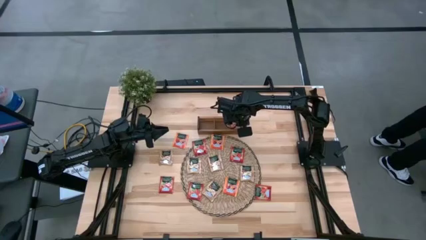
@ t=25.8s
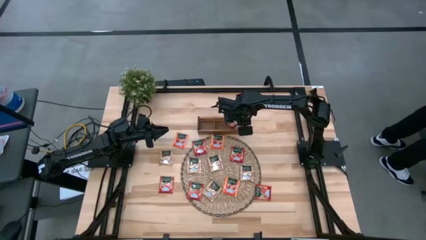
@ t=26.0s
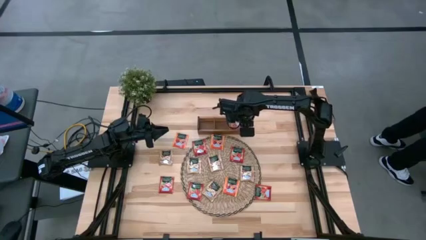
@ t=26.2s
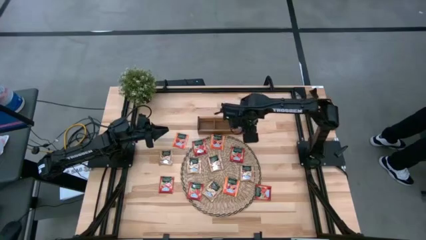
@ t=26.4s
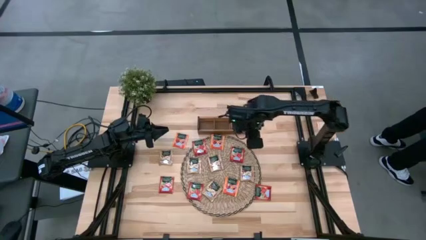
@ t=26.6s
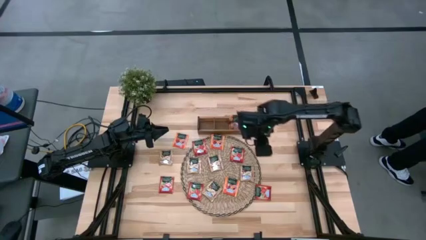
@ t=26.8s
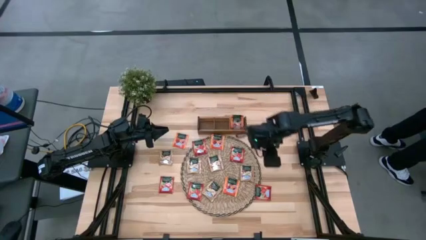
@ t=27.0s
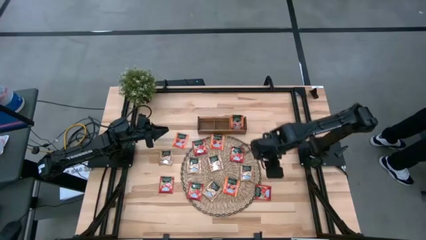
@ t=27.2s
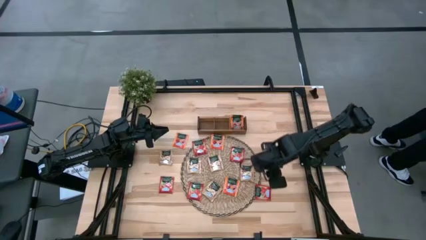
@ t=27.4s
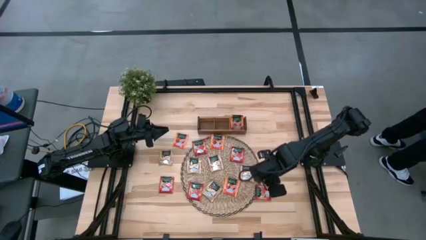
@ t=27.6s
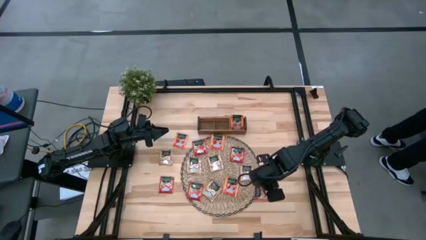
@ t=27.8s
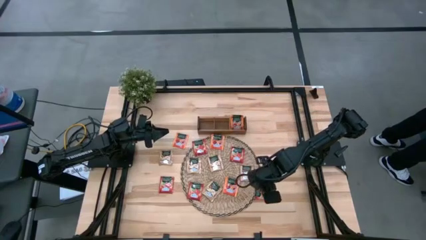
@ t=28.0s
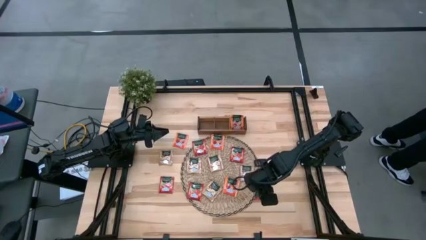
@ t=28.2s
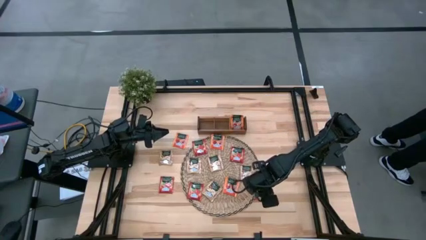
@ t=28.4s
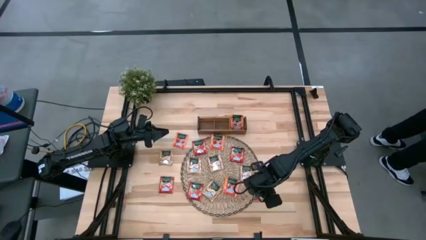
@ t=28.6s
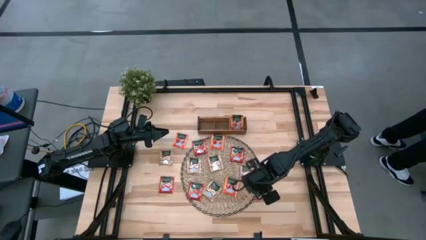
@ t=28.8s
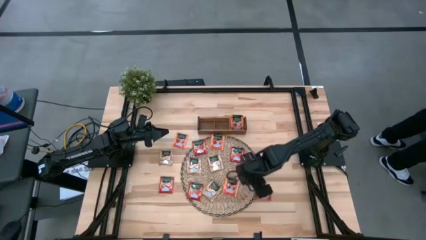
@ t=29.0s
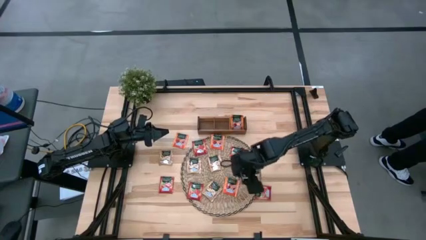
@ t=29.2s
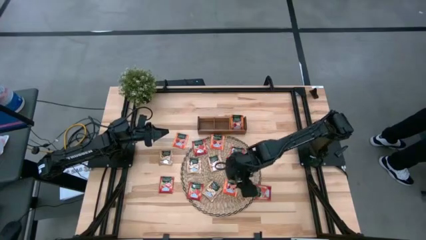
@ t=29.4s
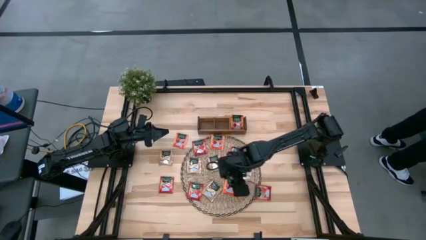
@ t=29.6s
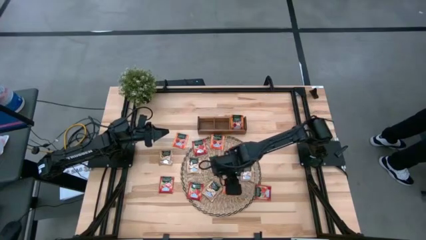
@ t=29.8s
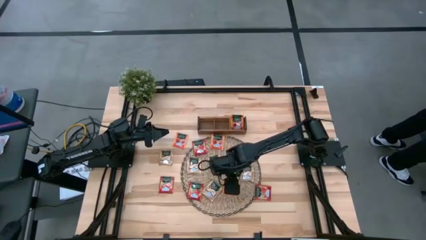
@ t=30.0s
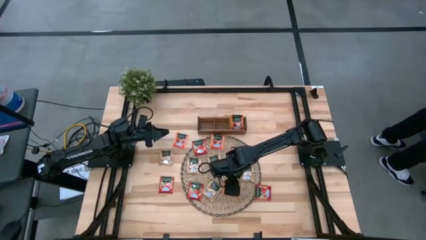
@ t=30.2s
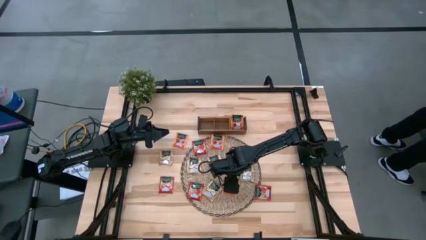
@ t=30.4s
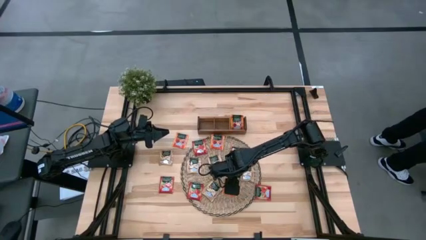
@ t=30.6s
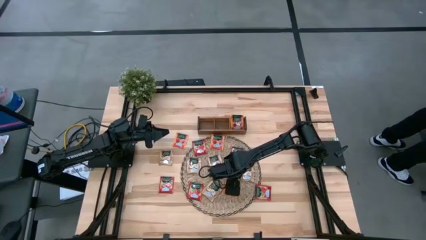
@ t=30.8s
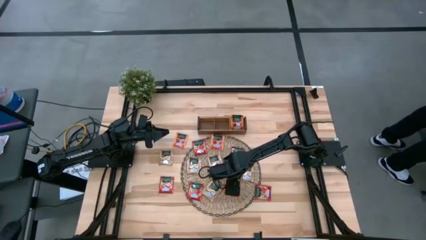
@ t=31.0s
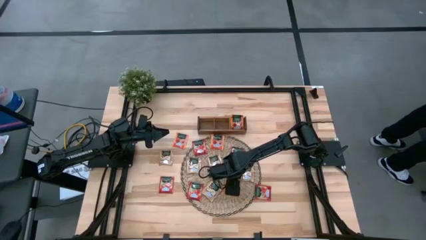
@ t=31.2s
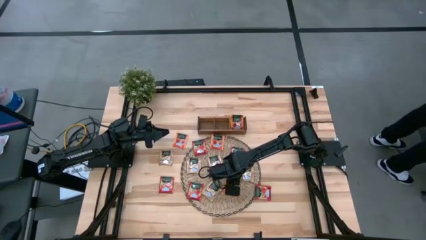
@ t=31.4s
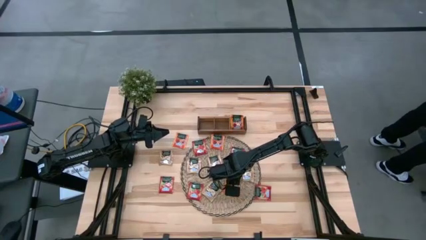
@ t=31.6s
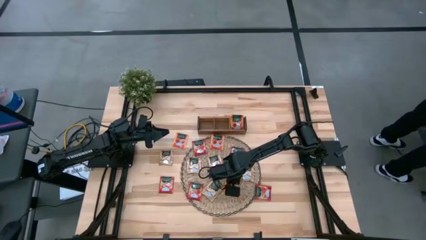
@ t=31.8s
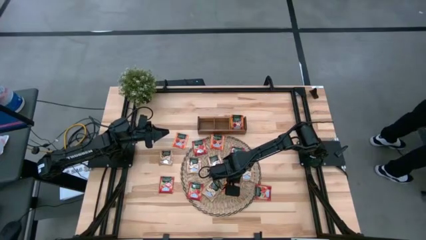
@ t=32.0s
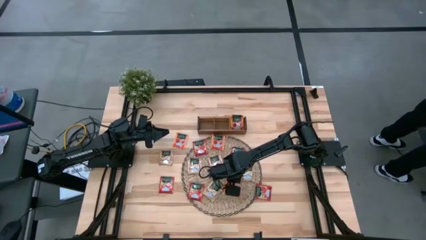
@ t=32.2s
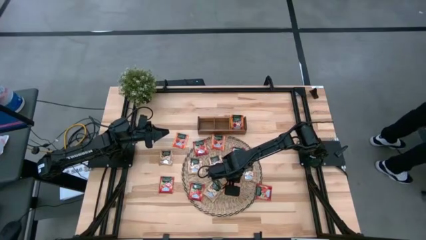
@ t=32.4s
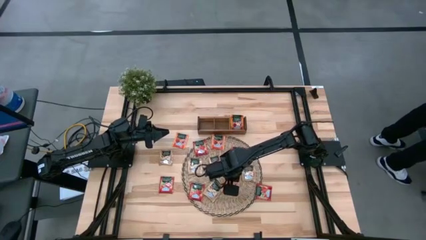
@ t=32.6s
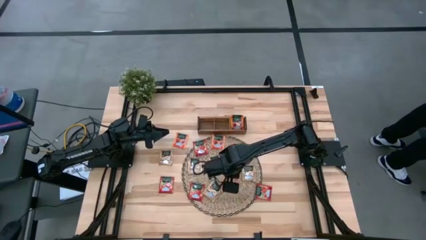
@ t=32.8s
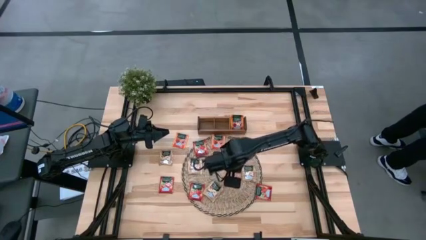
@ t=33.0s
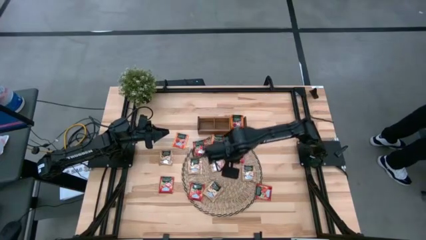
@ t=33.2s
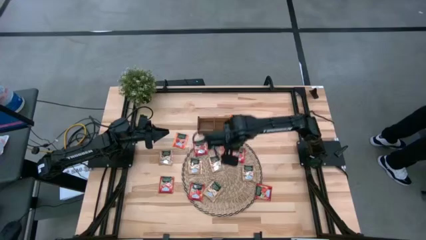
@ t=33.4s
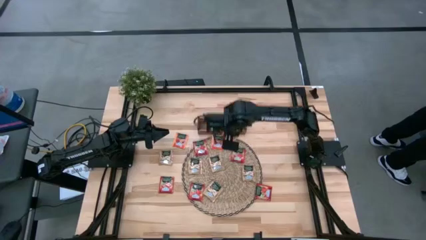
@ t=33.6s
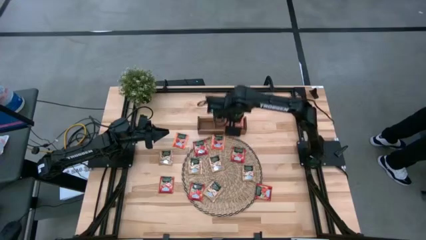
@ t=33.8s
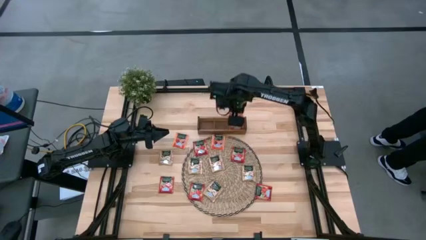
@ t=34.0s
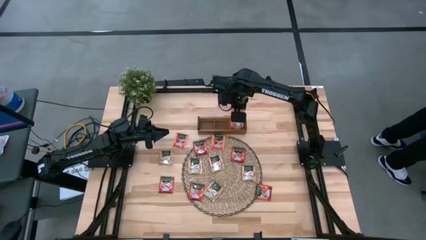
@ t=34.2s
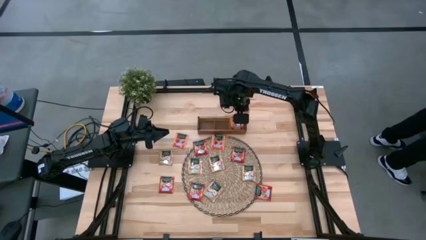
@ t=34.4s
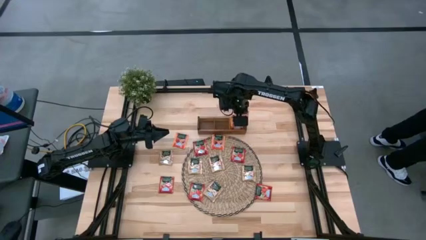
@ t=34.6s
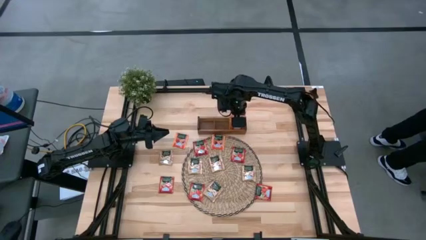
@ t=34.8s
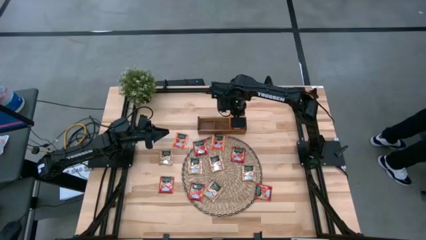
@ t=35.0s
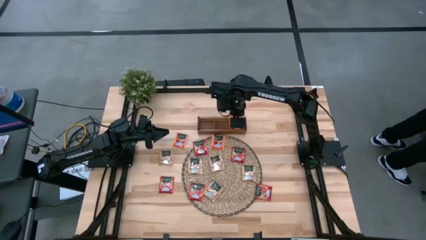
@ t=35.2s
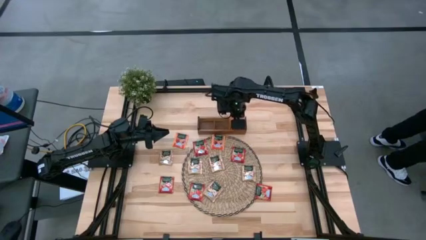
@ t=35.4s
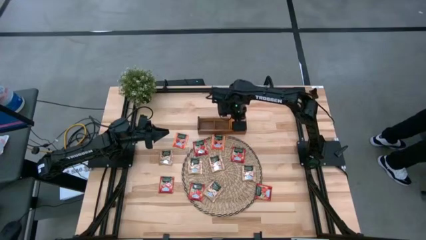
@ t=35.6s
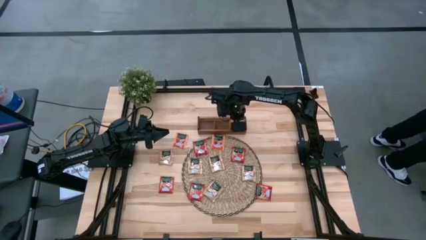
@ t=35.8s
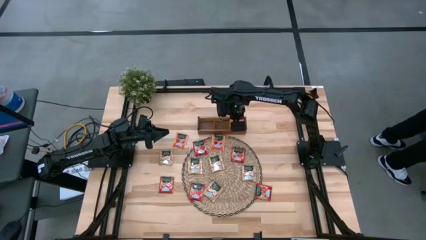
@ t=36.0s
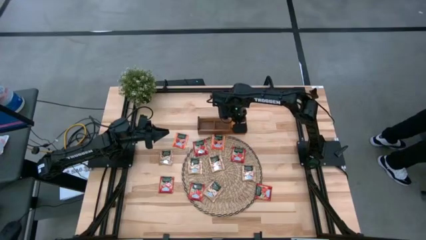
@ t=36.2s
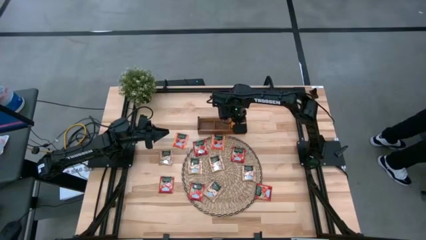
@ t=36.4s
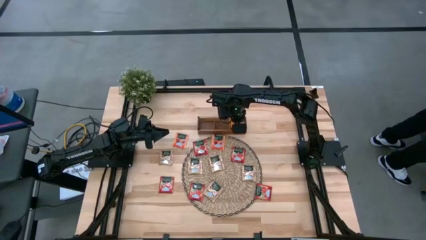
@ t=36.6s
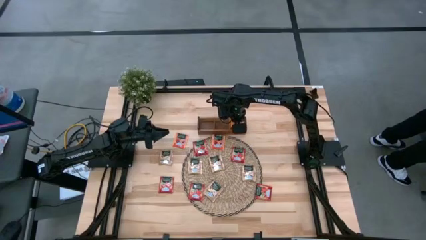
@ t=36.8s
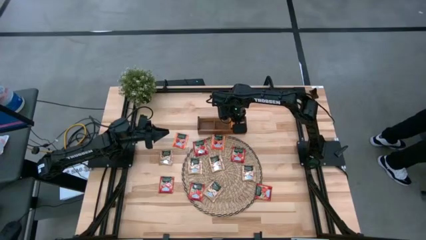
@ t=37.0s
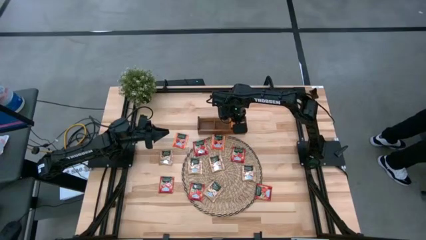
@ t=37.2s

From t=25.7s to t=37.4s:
Task: Pick & Place Tea
Put the orange tea bag to the right of the wooden organizer

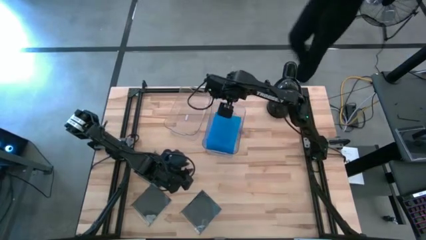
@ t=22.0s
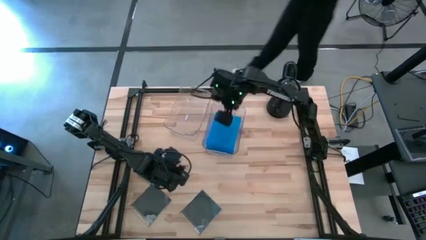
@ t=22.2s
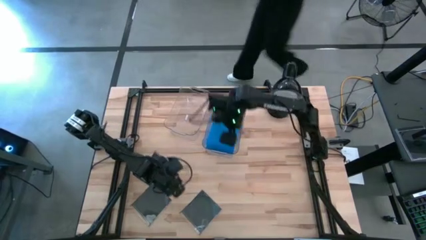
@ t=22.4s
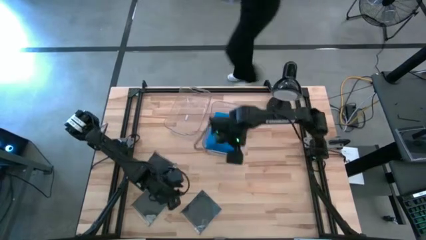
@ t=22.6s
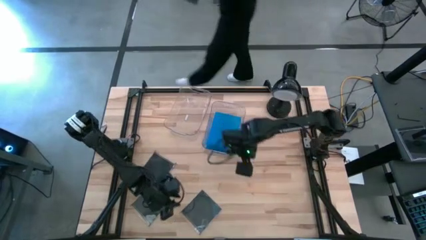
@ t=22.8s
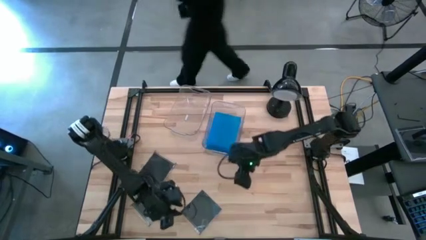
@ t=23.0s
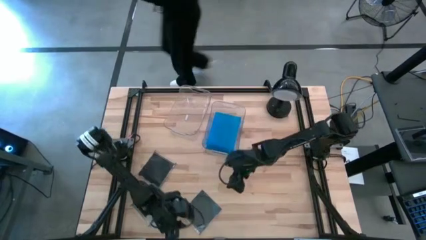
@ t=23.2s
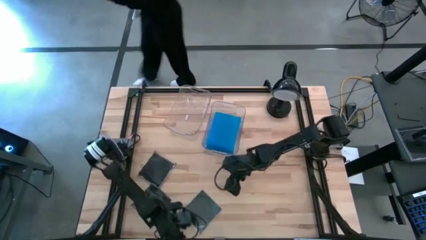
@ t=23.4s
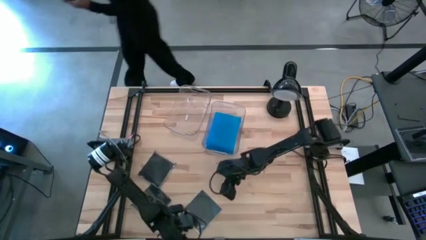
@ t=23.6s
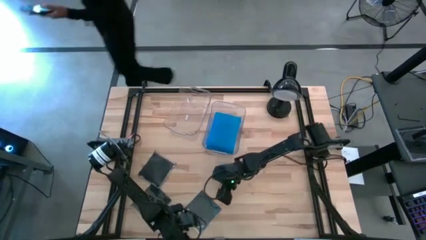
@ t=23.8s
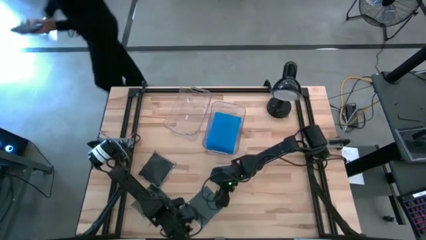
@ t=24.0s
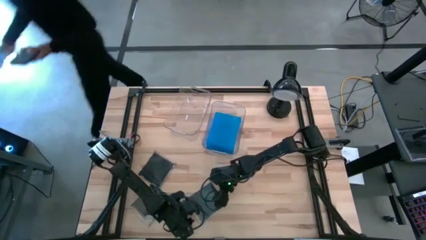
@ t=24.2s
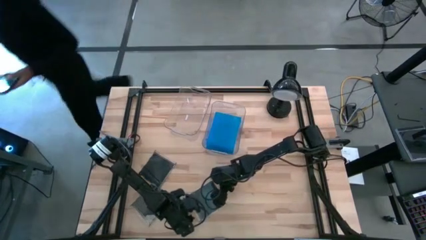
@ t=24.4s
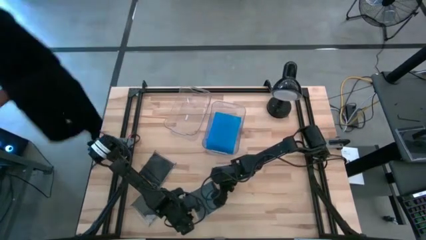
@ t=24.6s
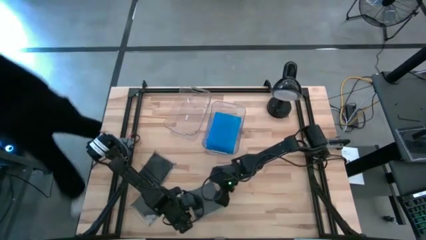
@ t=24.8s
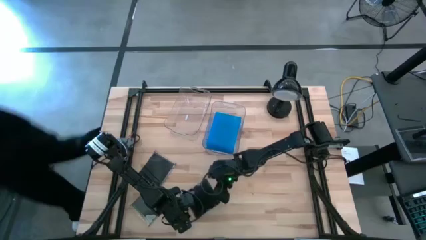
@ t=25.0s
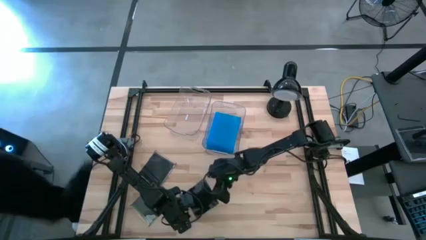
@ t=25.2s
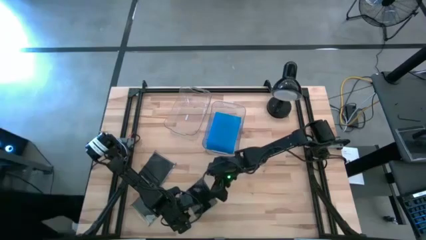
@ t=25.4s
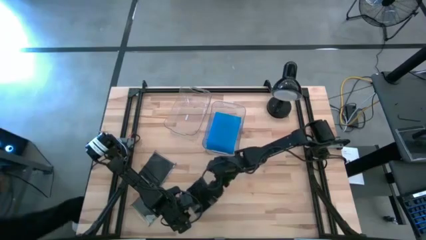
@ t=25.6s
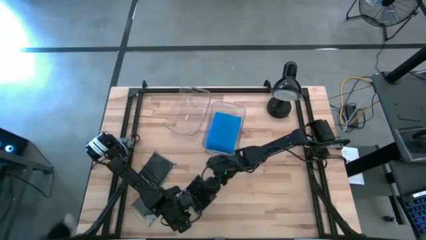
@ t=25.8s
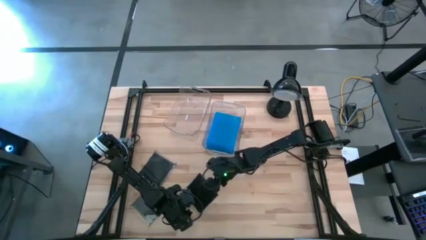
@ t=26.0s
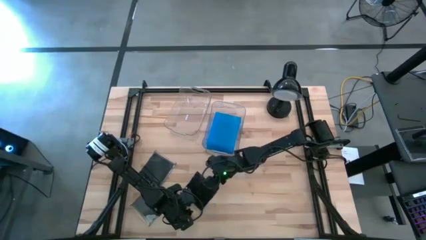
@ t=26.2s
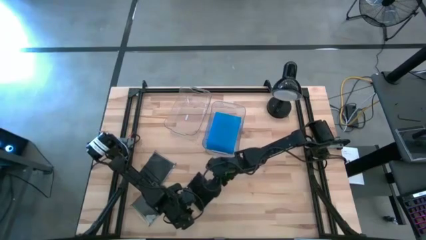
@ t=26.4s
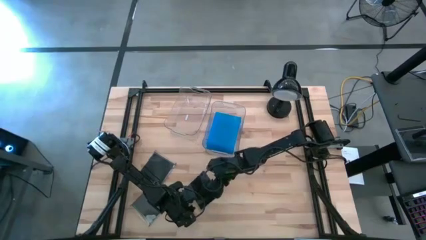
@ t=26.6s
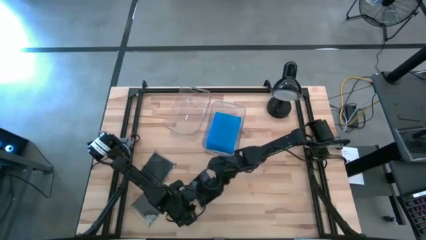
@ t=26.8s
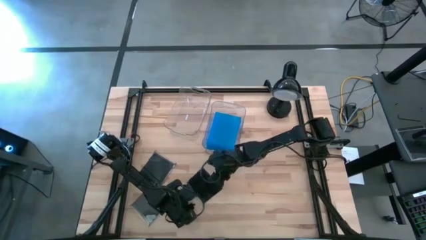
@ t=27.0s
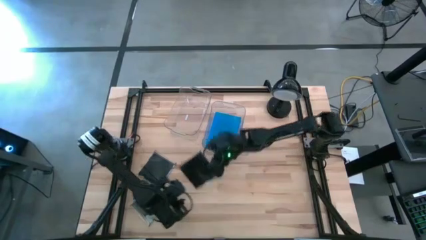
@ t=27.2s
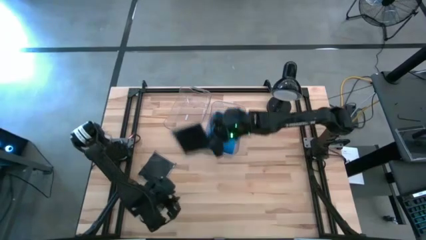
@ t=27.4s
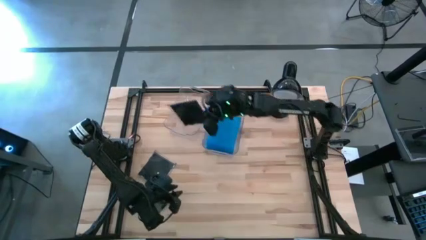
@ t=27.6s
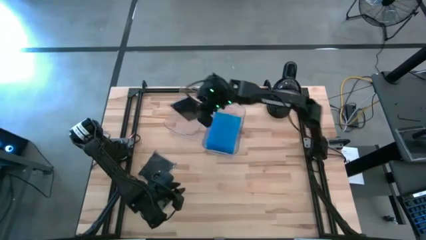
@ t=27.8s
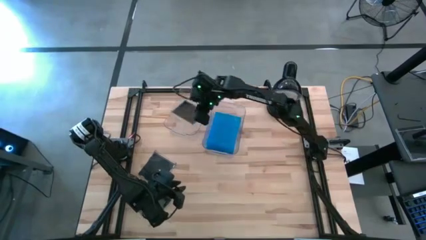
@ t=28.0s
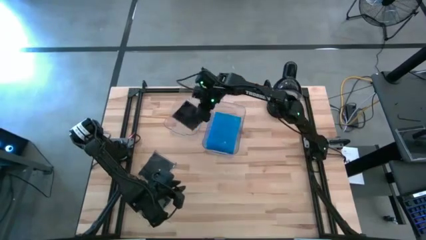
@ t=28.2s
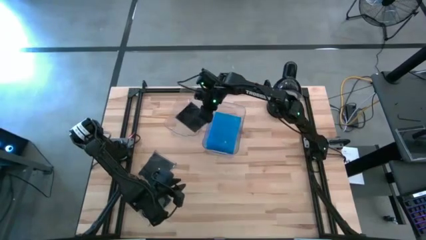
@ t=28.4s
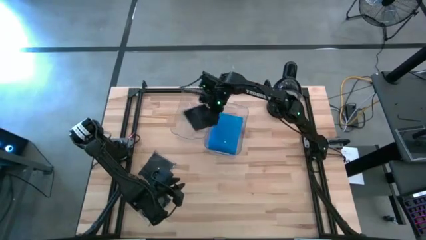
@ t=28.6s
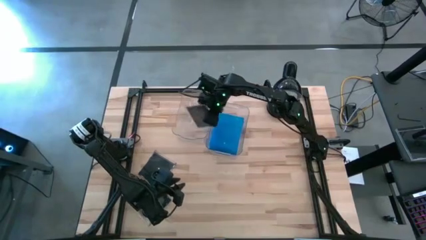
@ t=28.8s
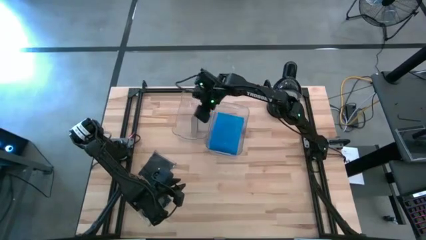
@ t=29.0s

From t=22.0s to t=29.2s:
Task: Pick & place jewel cases by type
Put the bottom right black CD case into the left transparent bin
